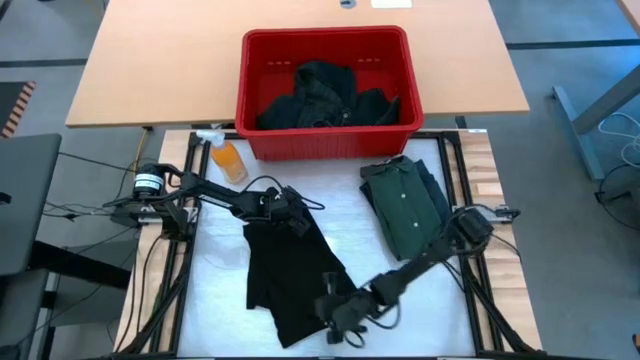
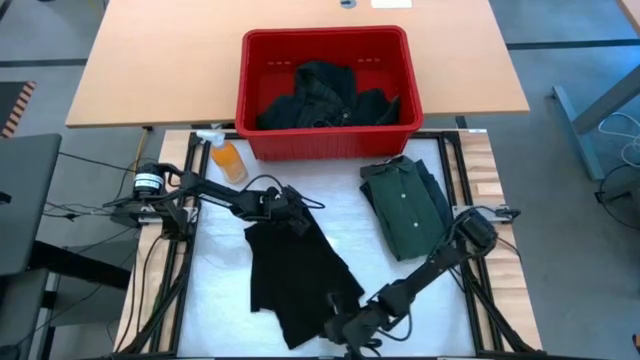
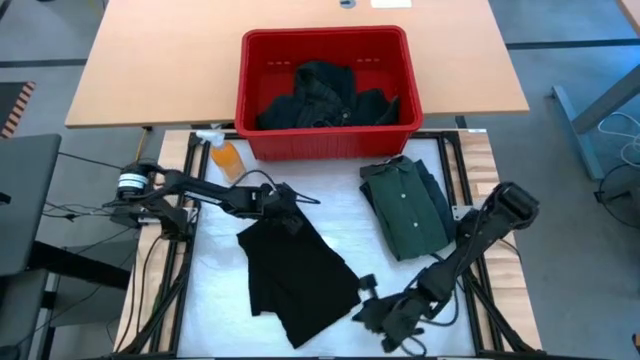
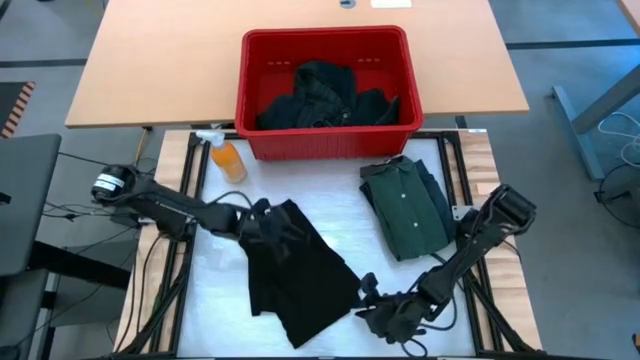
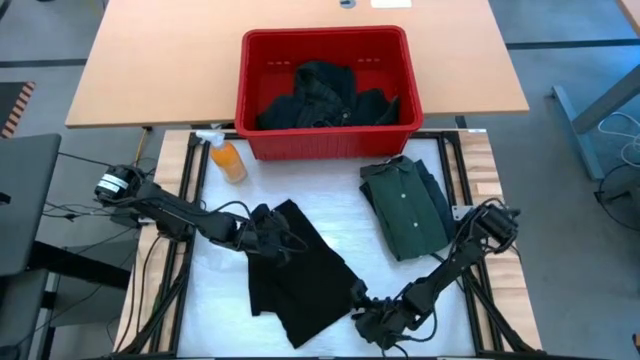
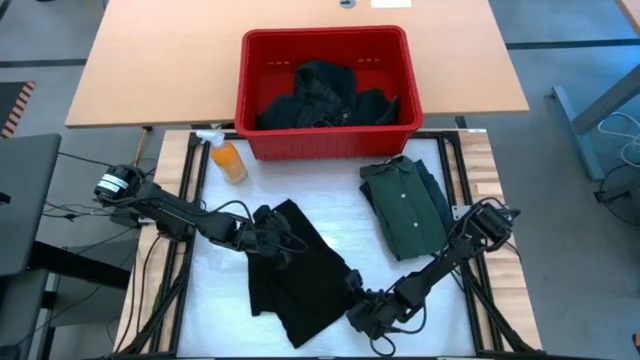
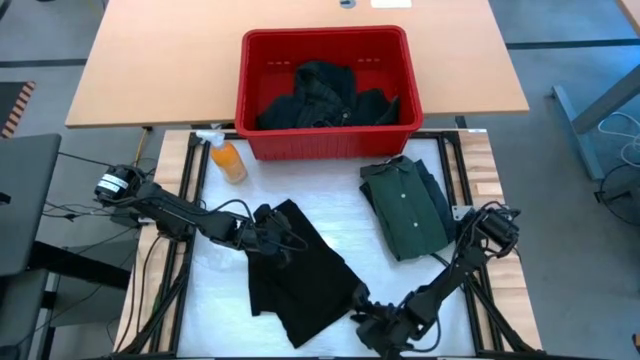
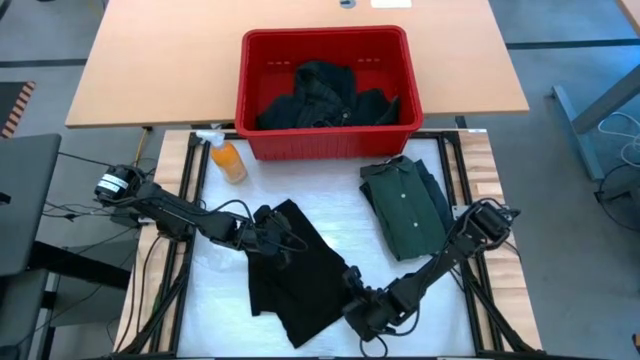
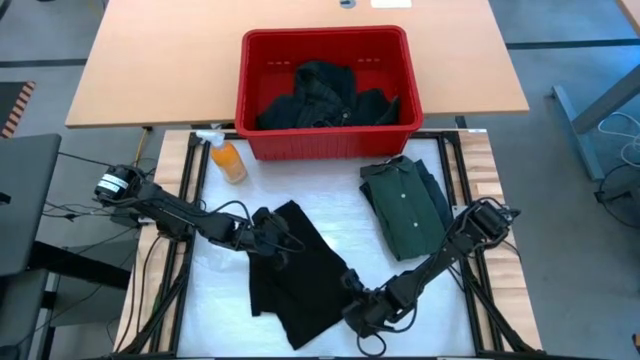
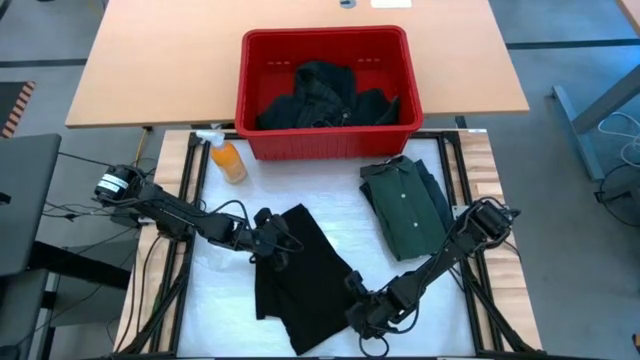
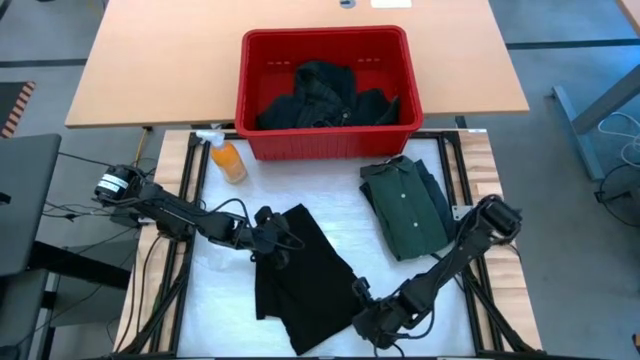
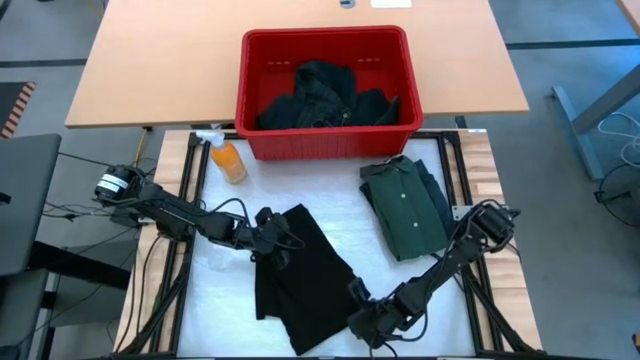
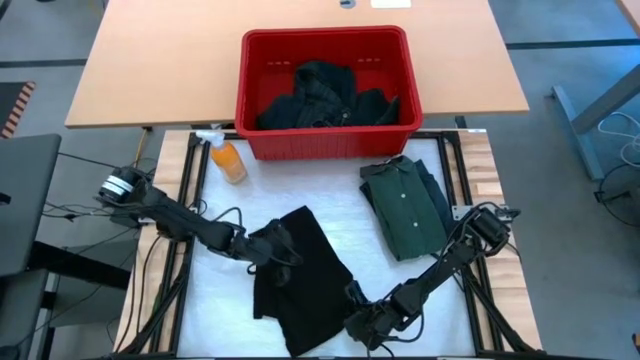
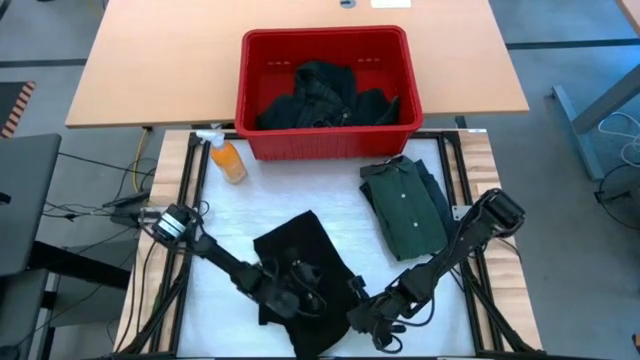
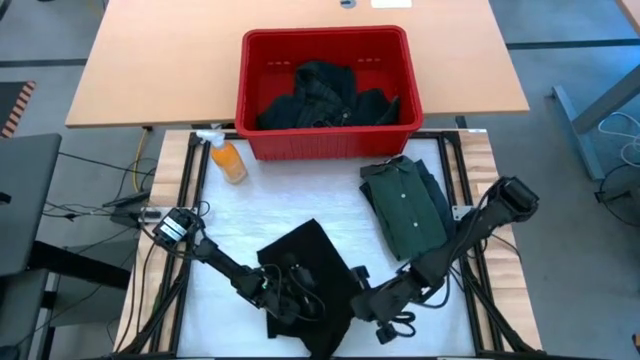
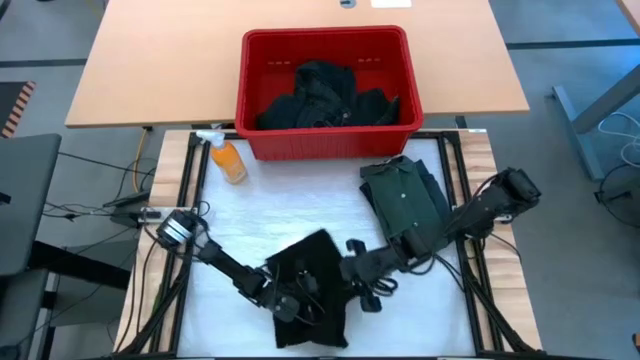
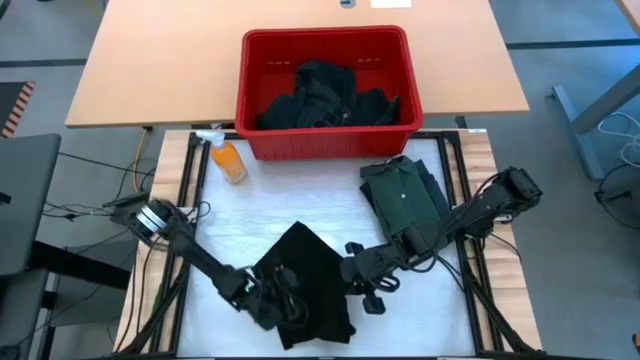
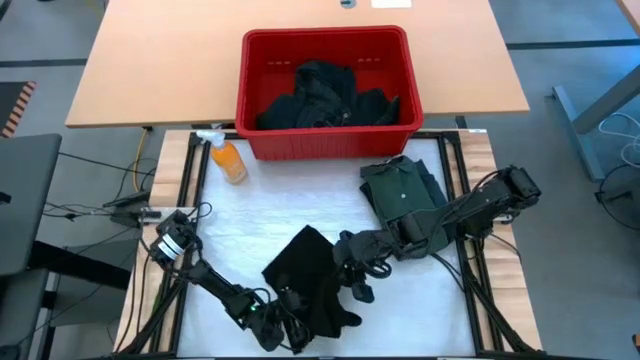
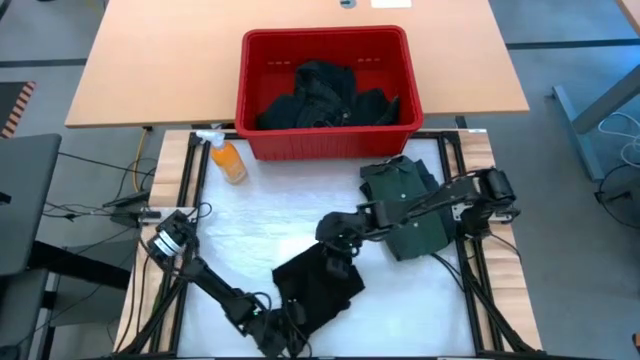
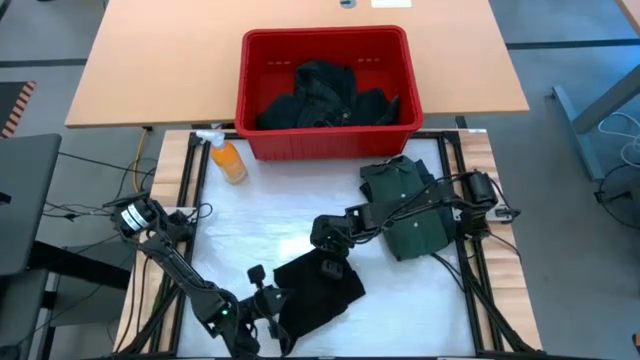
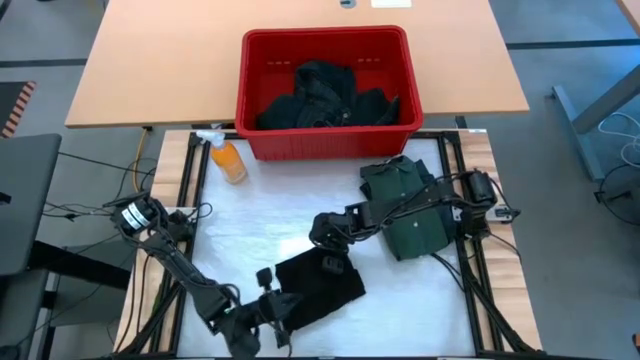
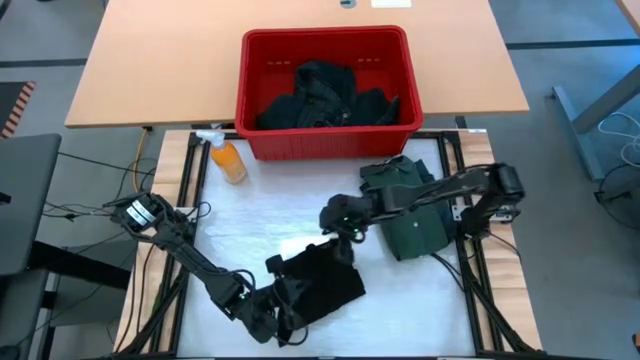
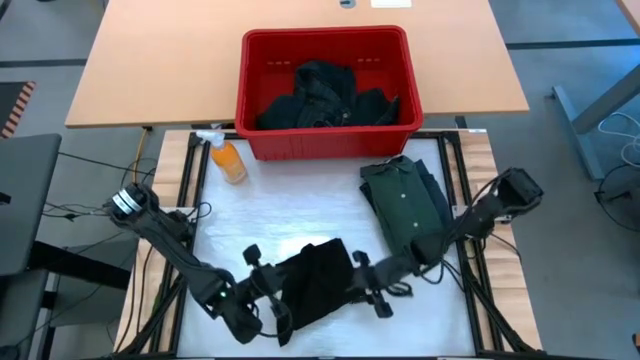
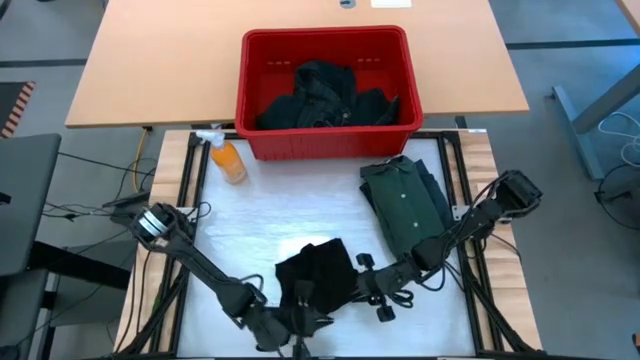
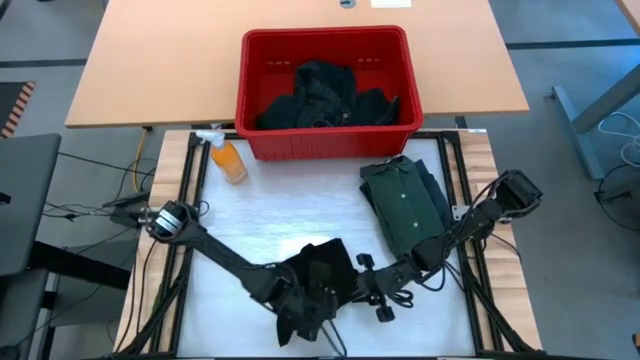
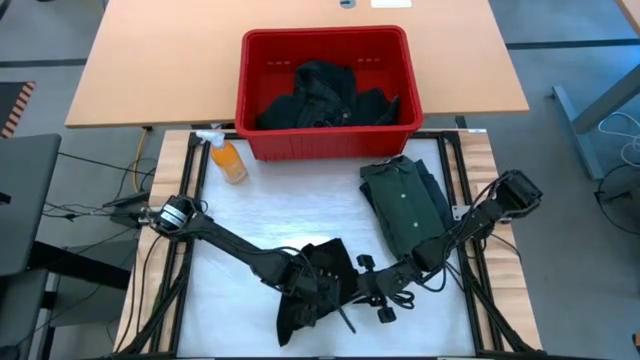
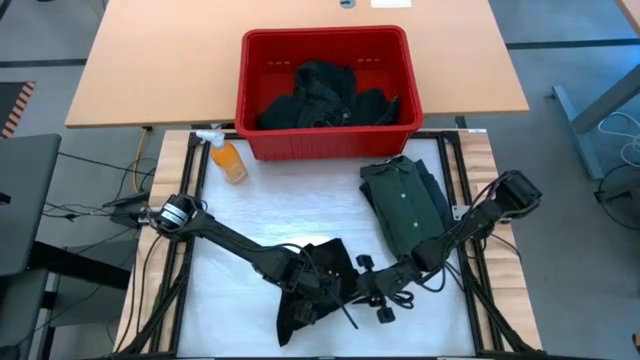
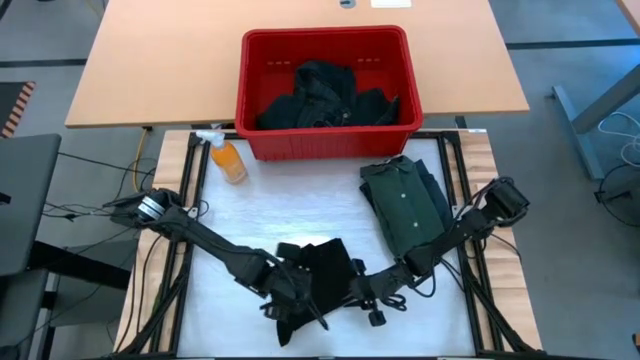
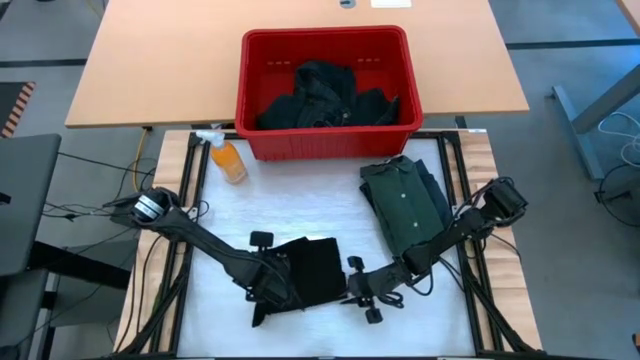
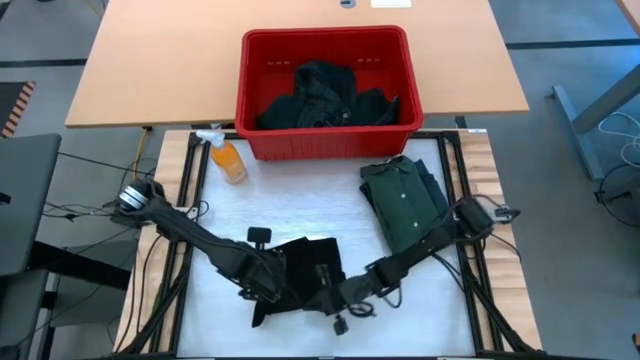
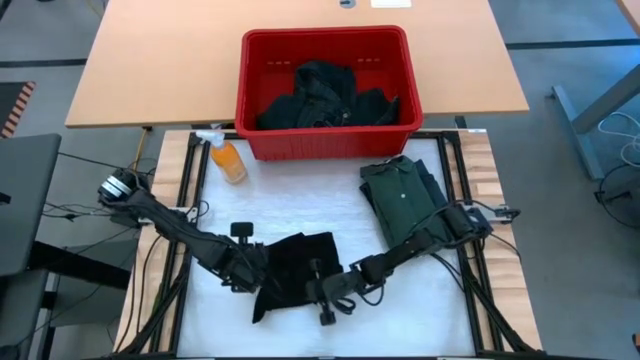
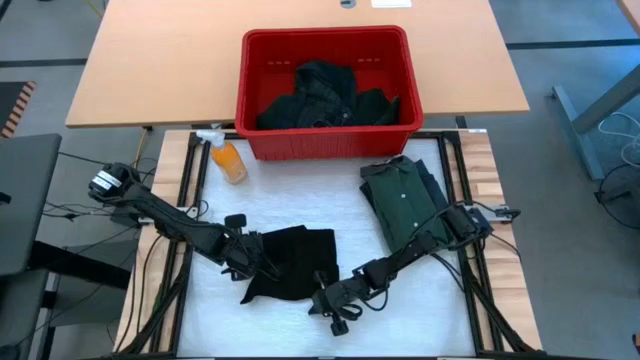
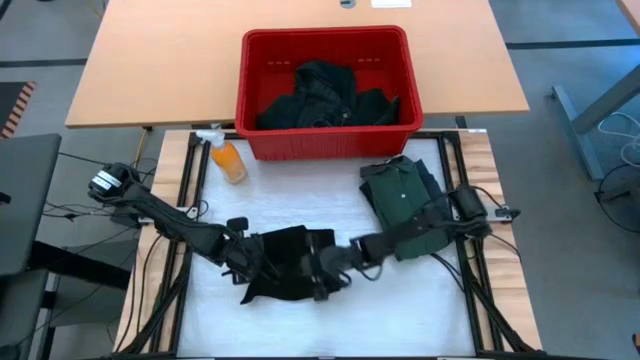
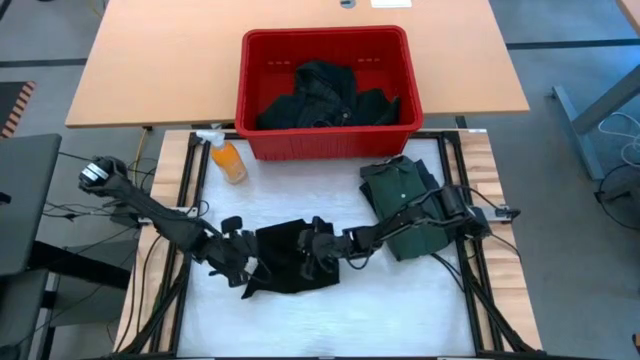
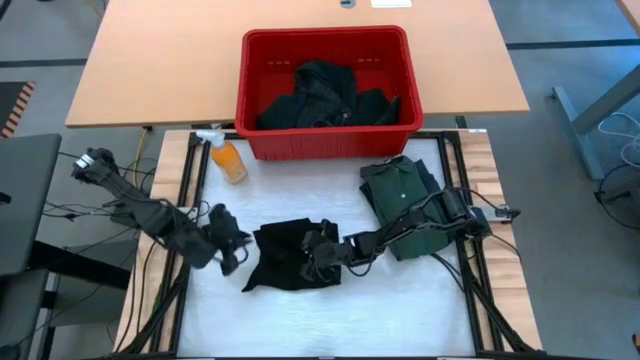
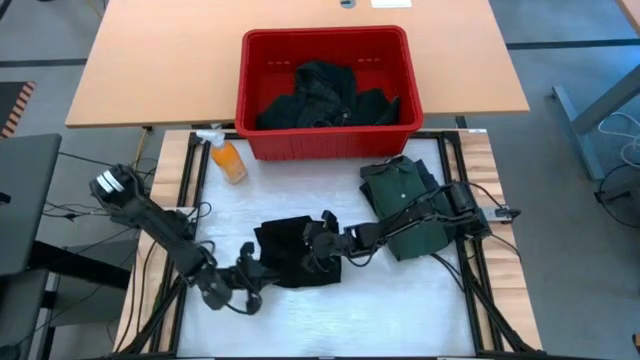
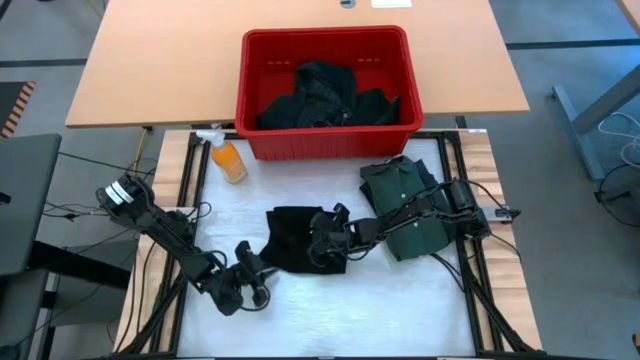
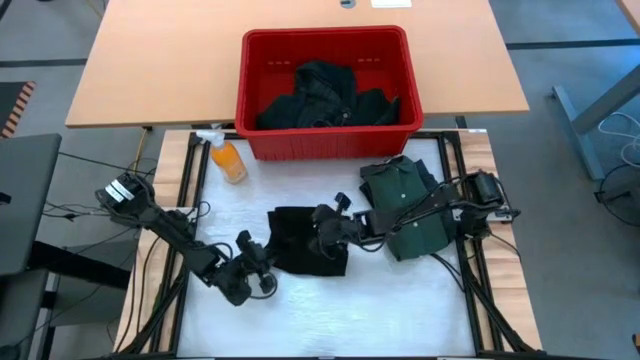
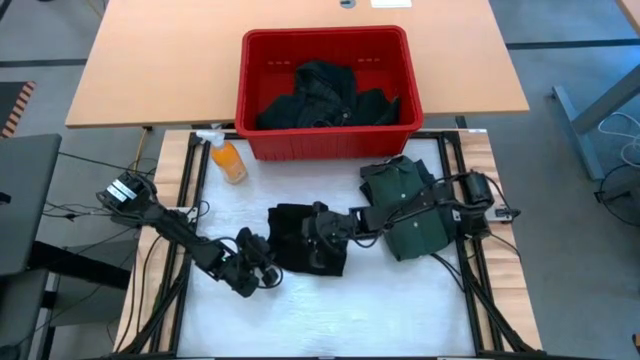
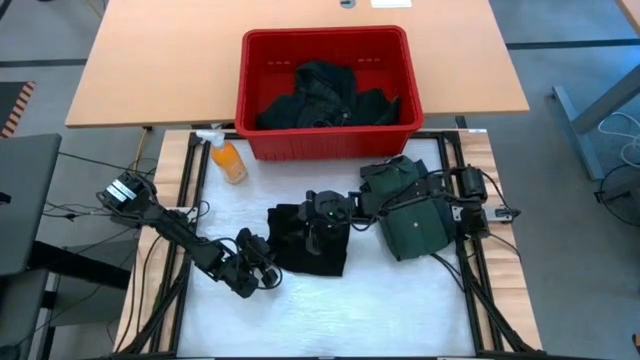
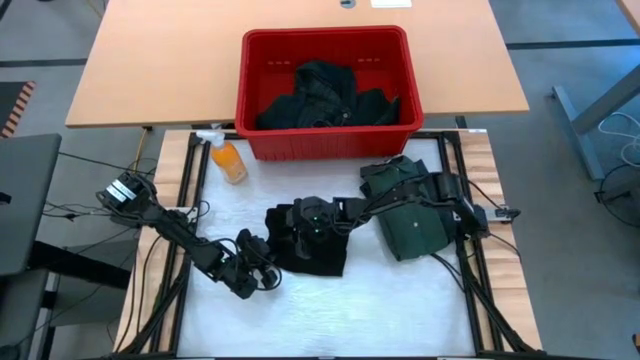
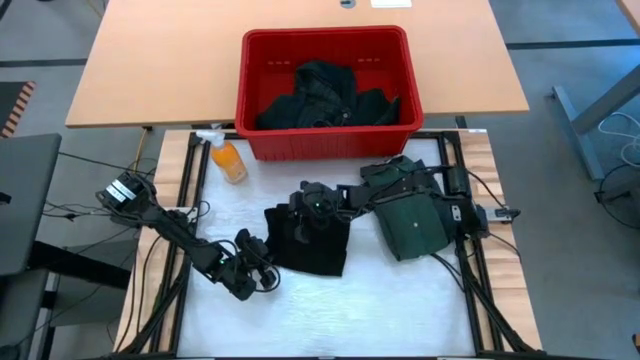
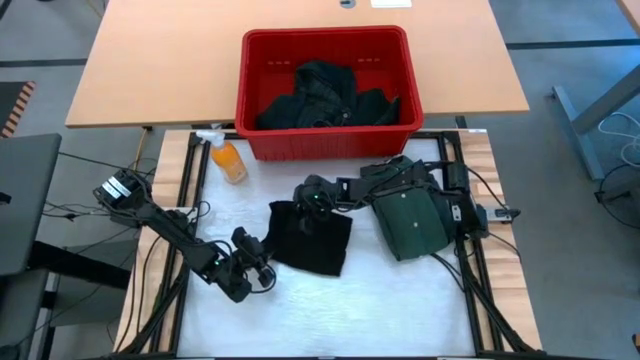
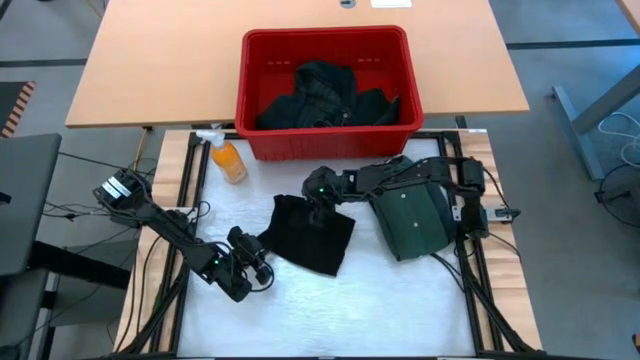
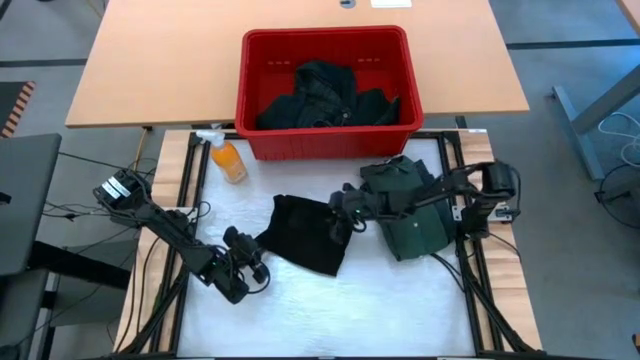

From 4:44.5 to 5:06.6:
Task: Fold laundry
Fold the black shirt
